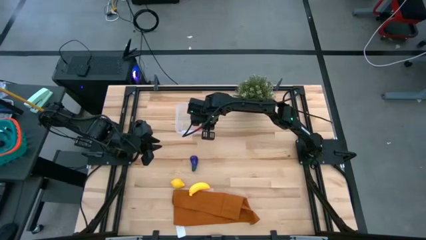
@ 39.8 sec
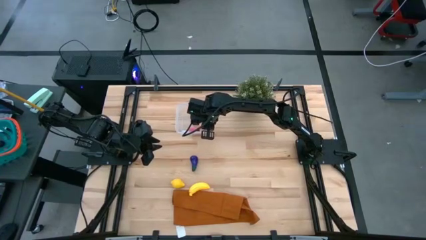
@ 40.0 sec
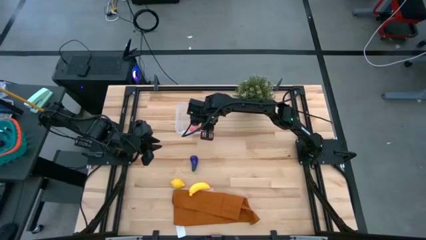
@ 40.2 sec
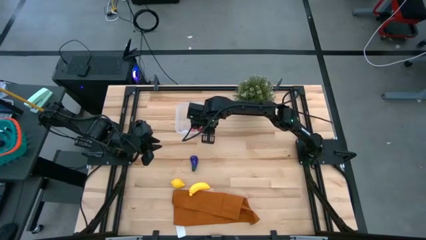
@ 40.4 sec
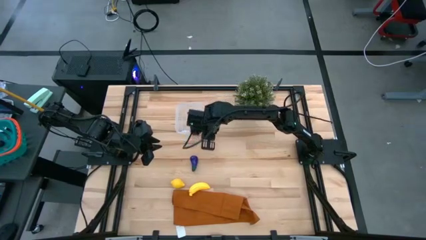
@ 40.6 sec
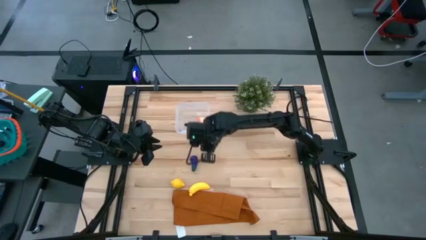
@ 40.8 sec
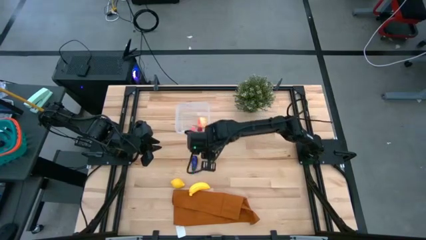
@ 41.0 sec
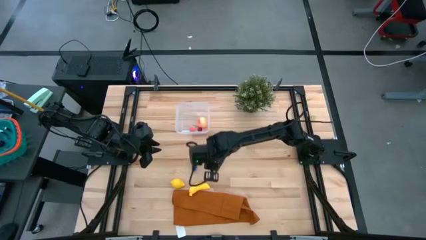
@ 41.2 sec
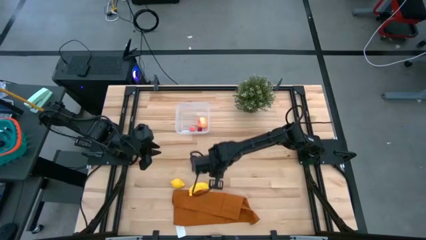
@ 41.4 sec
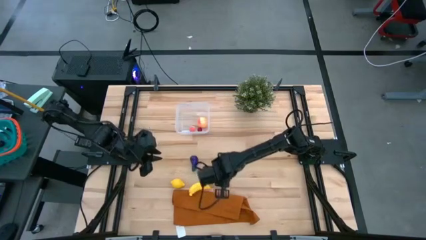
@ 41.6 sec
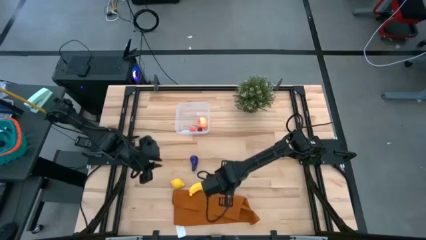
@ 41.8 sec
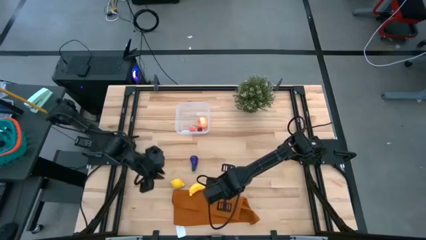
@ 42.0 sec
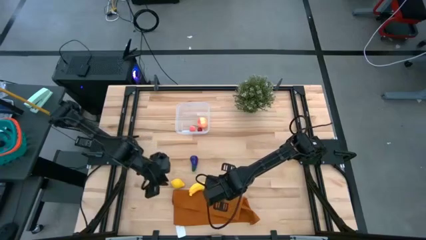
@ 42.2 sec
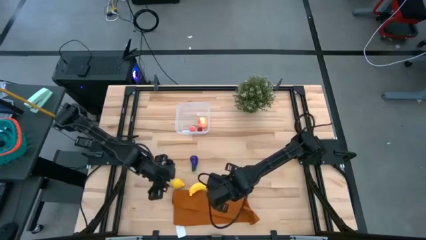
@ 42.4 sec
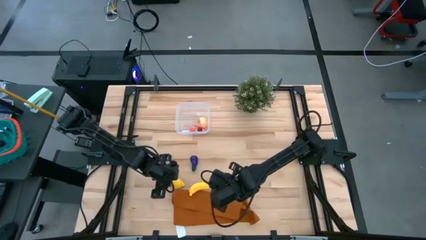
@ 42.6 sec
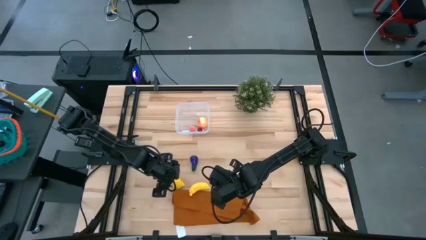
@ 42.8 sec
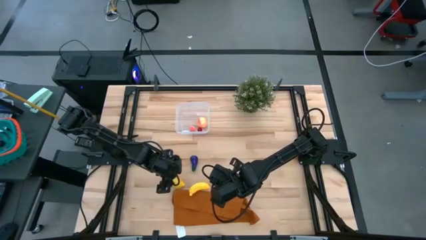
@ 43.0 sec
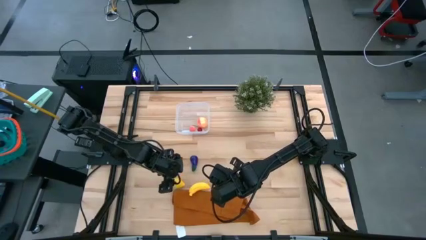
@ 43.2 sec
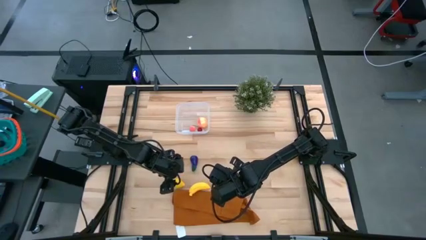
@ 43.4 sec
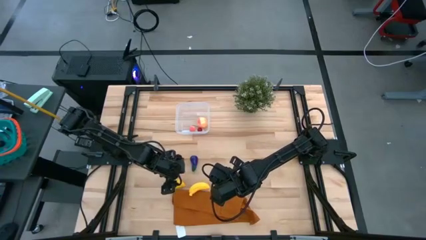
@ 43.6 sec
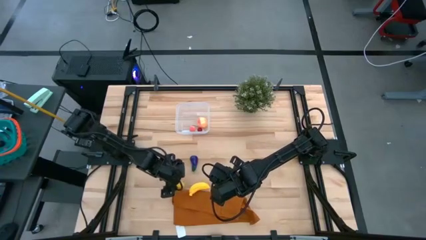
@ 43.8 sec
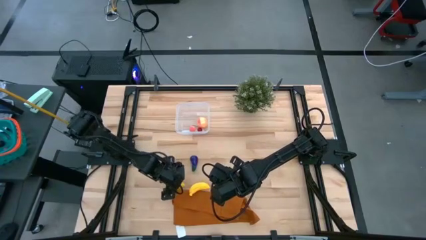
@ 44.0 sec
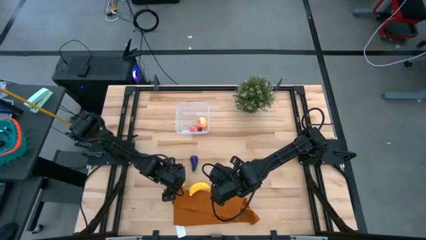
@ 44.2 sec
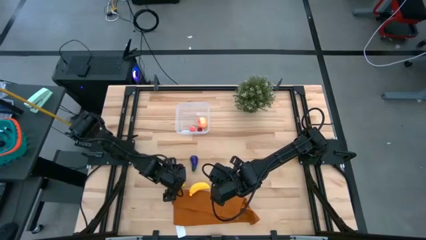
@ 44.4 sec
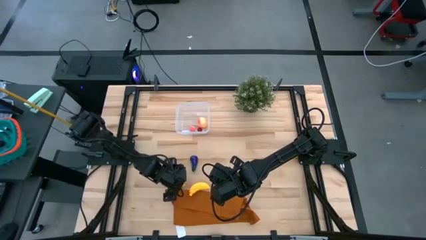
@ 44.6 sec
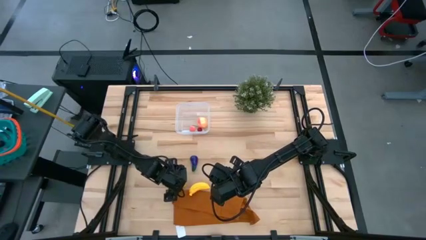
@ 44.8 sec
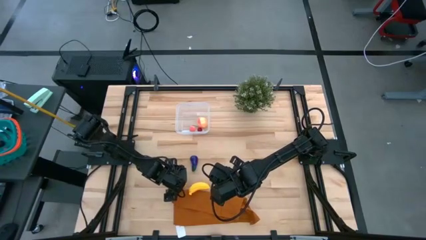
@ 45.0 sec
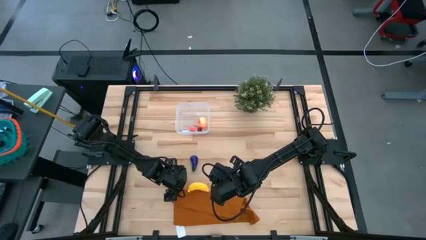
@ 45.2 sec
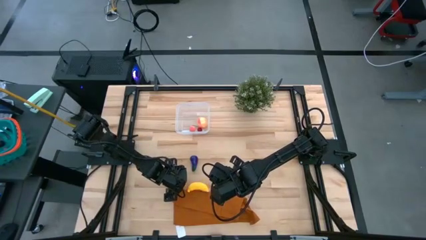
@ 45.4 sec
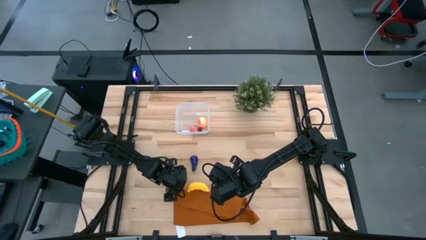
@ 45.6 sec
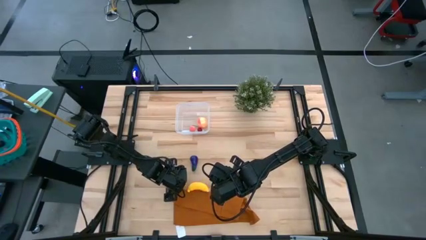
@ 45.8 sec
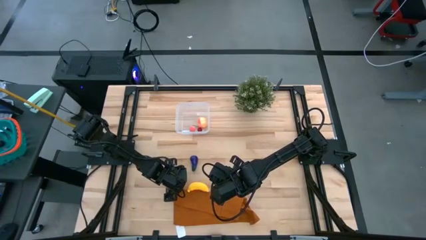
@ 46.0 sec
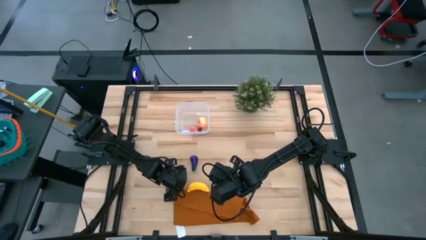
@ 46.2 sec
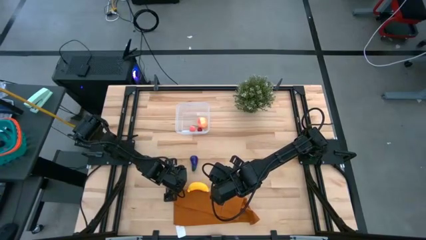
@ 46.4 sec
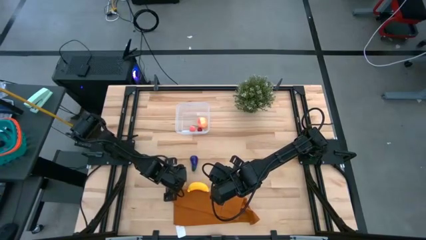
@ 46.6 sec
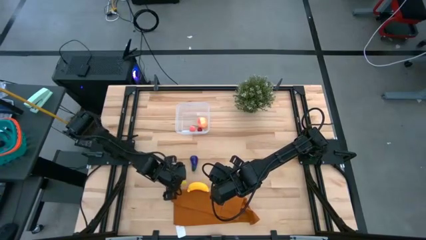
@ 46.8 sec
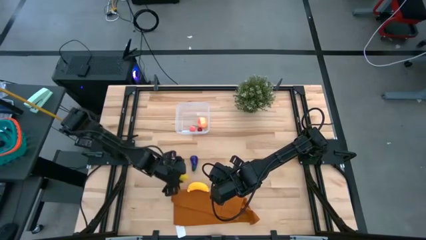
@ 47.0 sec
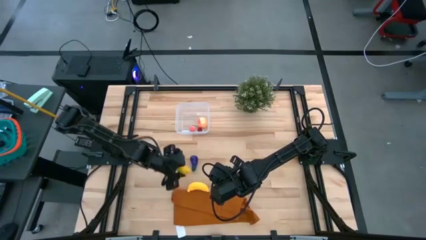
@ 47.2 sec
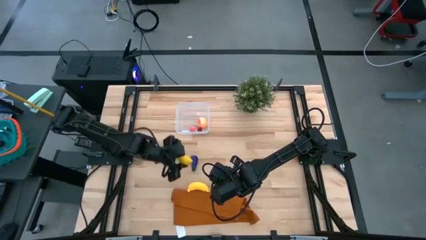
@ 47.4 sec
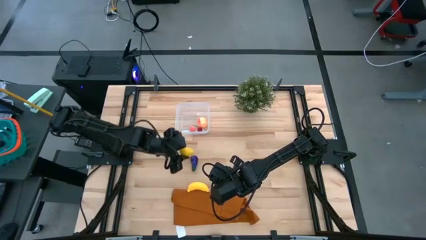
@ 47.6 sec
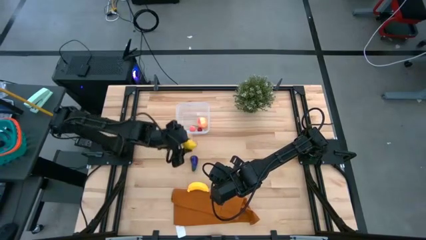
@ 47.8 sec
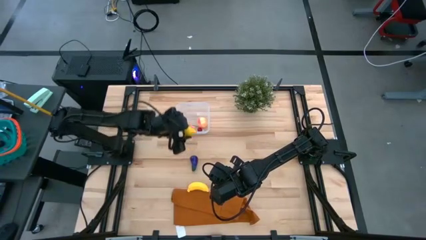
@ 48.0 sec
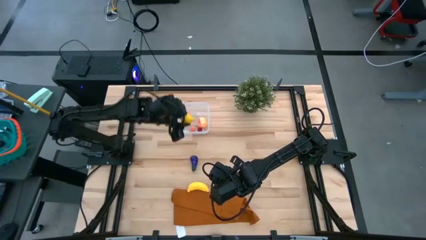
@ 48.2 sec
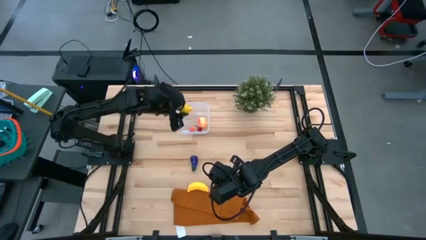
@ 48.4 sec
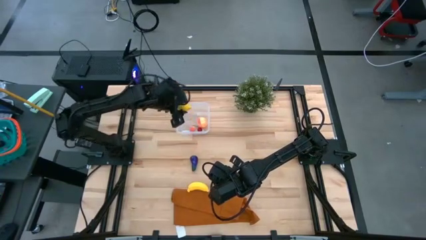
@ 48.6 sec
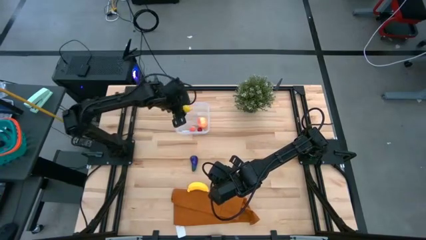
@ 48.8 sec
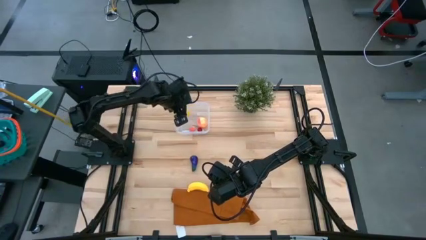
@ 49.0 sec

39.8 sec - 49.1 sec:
Task: Pick and placing Produce into tupperware
Put the lemon into the container
